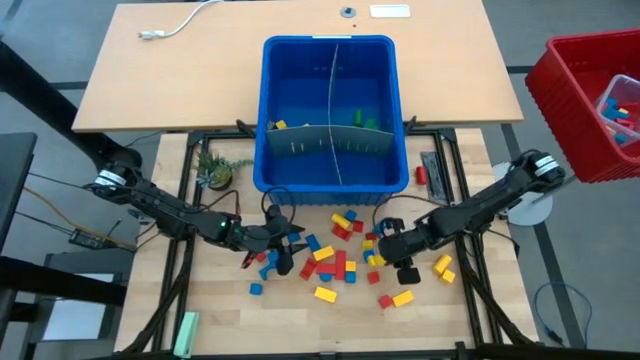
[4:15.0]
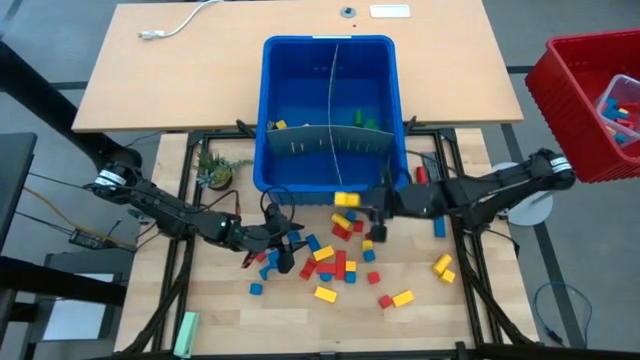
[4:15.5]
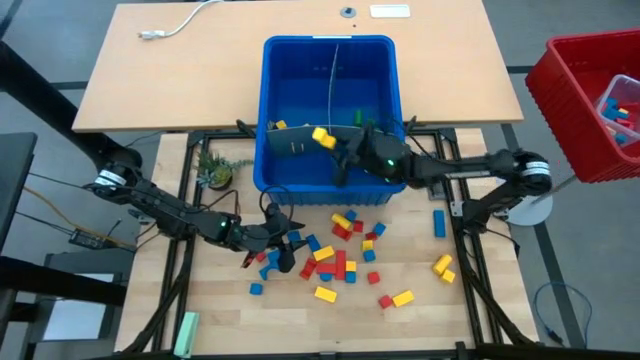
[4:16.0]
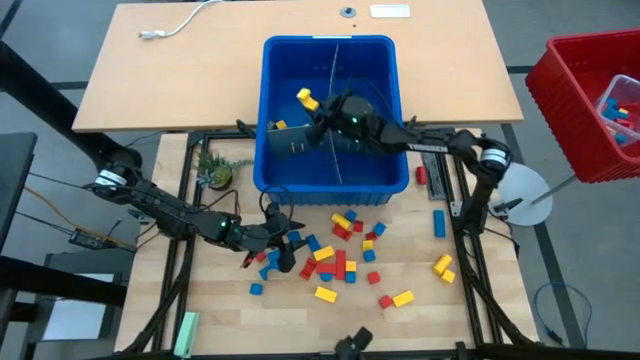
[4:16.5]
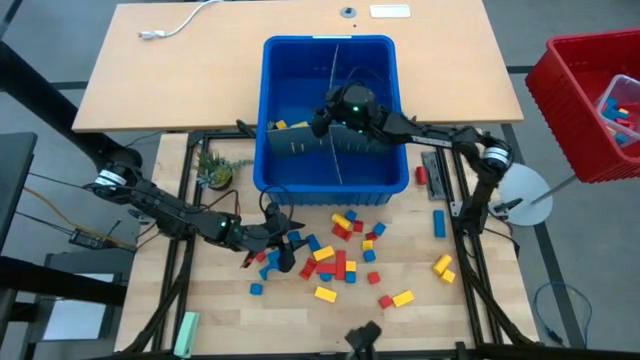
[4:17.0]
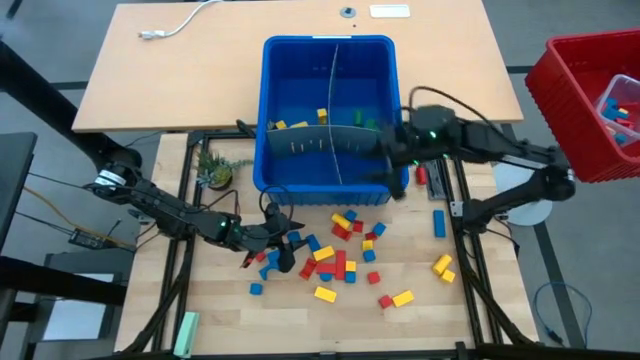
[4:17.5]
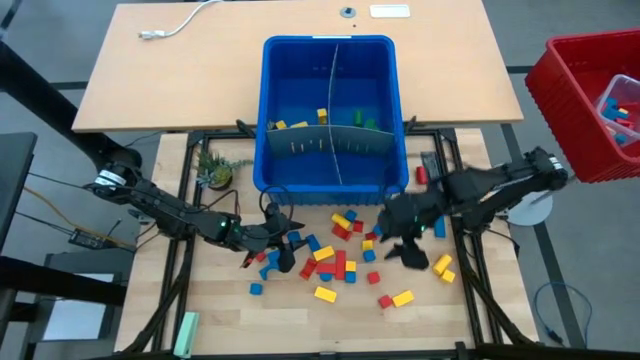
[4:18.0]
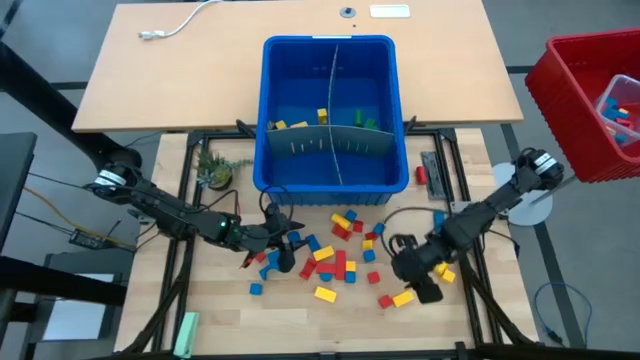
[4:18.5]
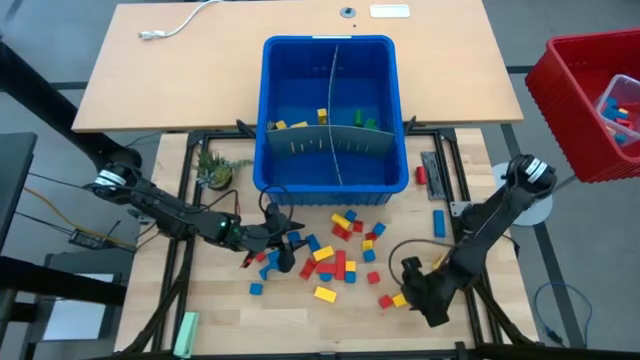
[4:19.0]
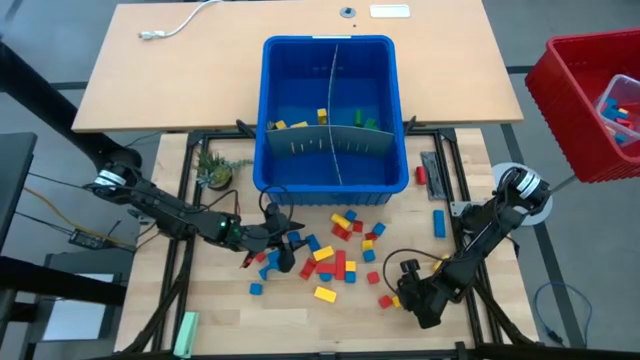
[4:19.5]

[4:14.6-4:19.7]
Task: Sort blocks
Put the yellow block with the other yellow blocks into the blue bin

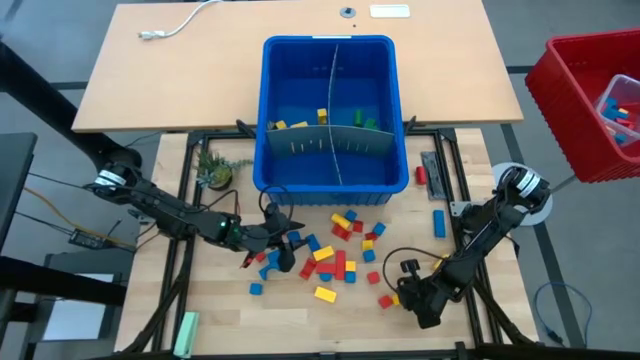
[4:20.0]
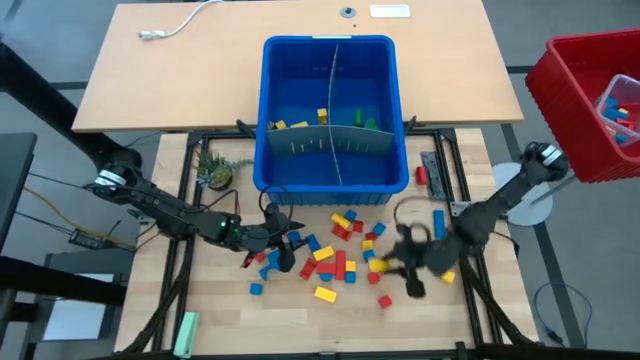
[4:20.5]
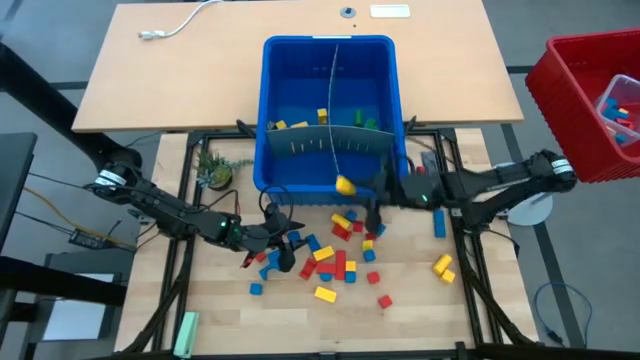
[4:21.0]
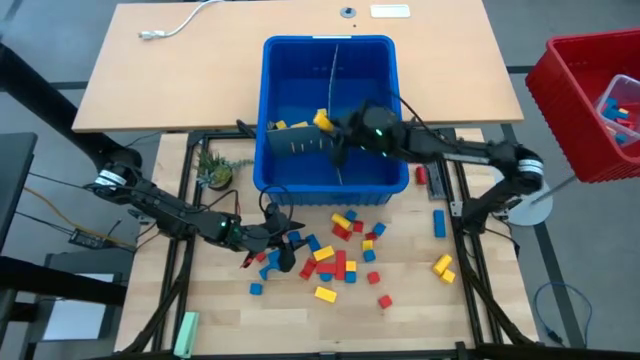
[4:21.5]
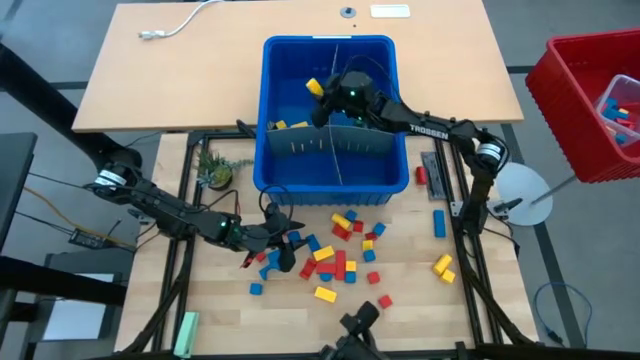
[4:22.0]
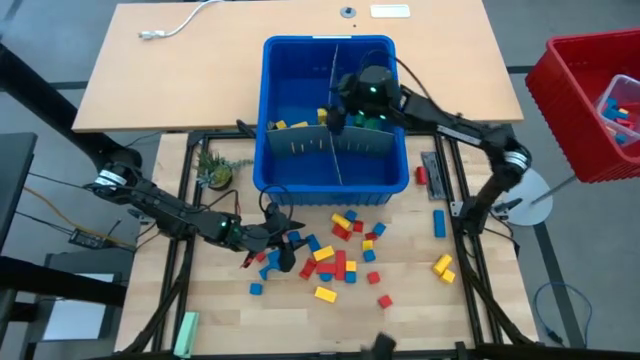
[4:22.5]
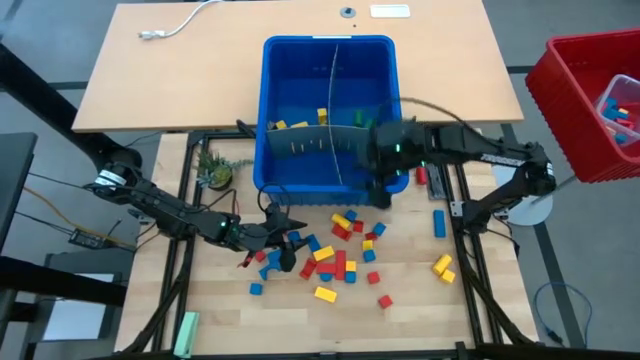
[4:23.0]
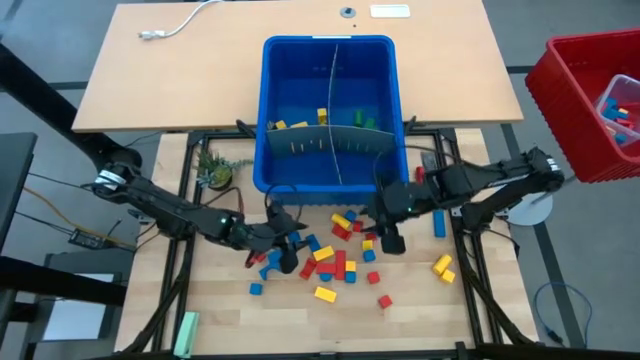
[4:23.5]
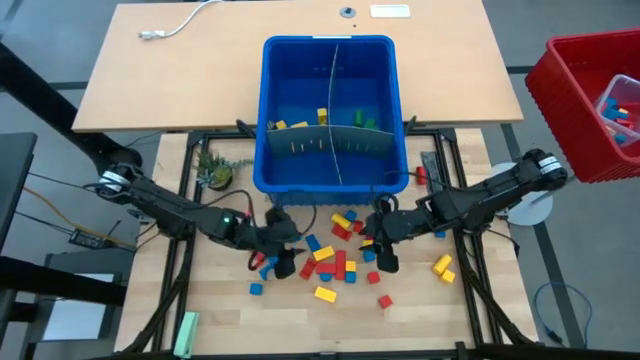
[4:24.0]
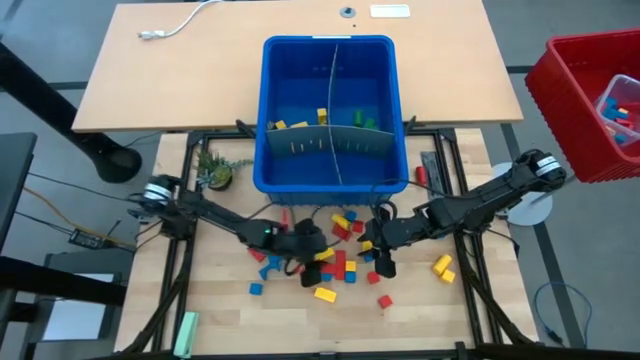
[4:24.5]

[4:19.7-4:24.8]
Put the yellow block with the other yellow blocks into the blue bin

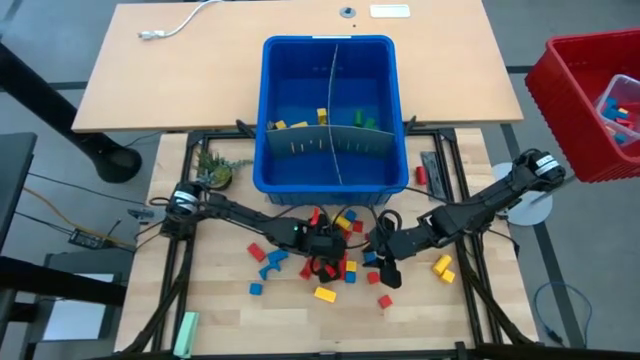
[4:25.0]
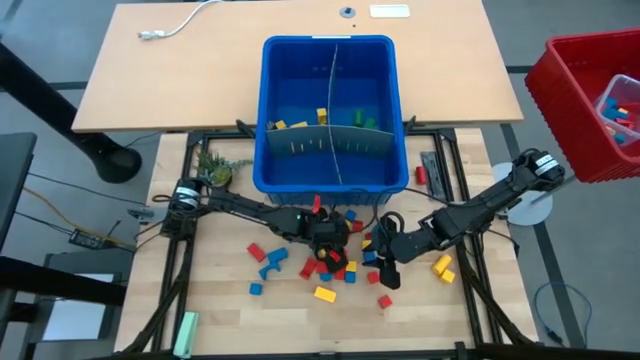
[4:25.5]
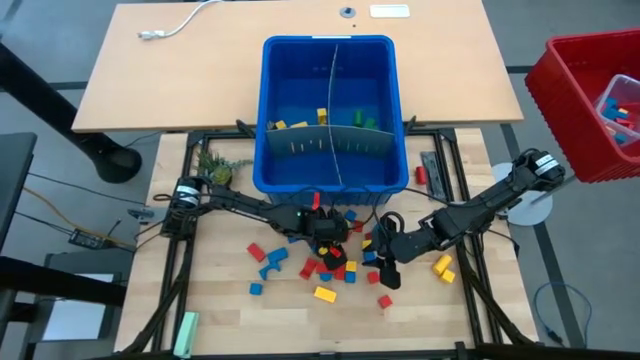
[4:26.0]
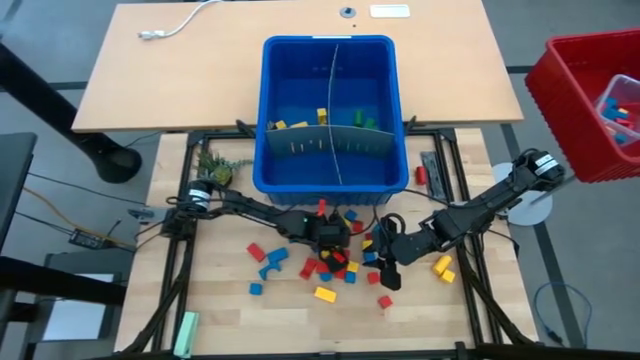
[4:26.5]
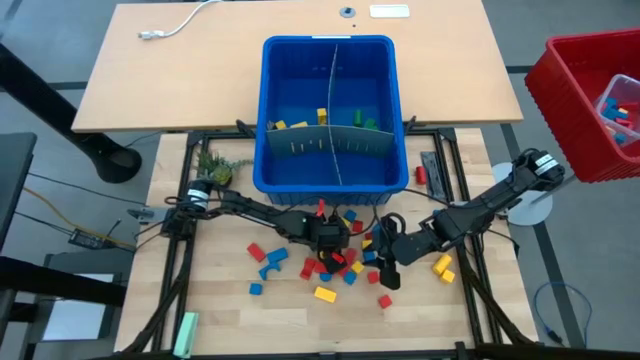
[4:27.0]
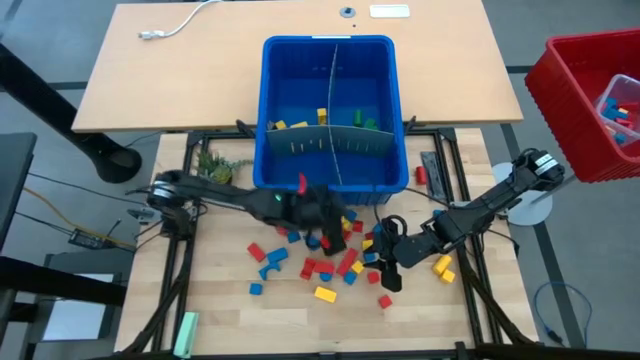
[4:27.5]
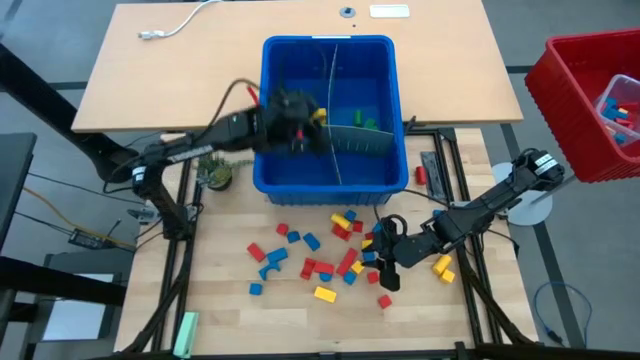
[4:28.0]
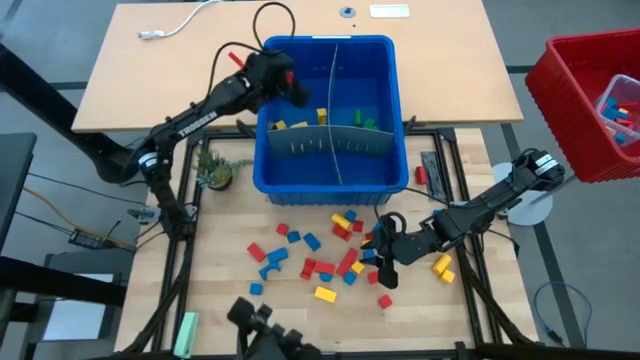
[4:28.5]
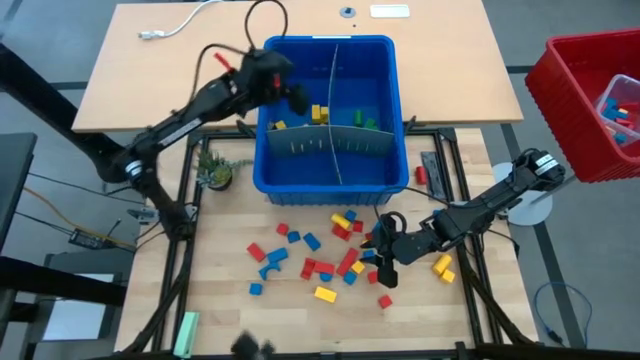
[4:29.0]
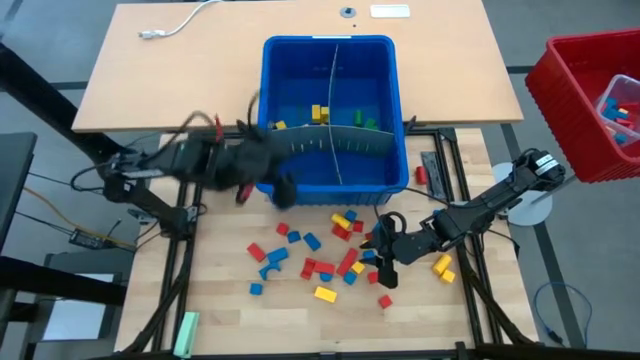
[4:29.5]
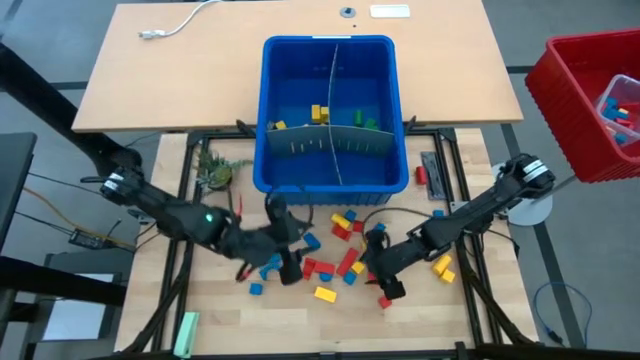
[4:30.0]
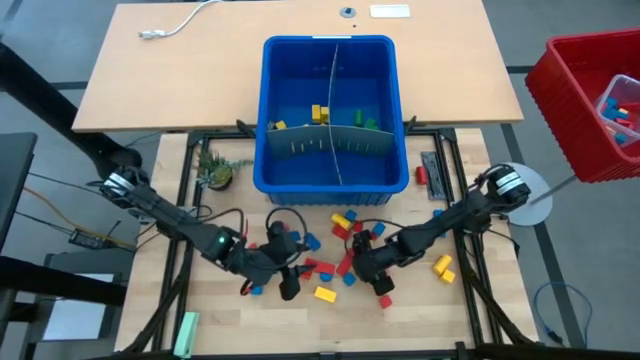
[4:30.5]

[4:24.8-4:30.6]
Put the yellow block with the other yellow blocks into the blue bin

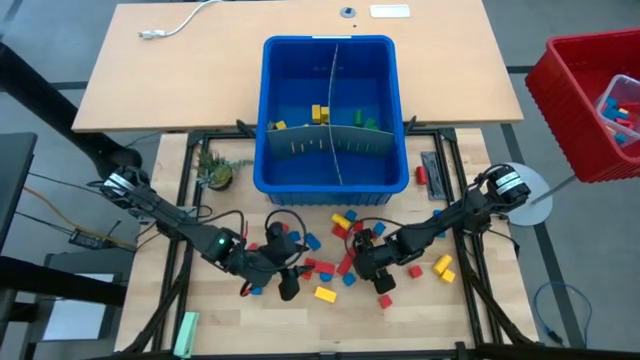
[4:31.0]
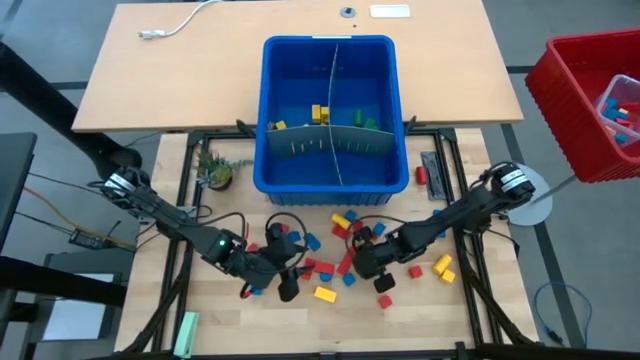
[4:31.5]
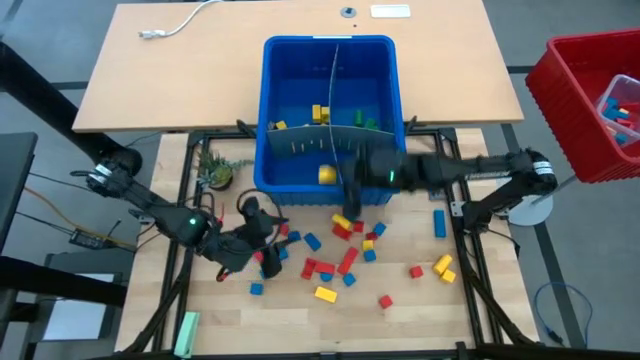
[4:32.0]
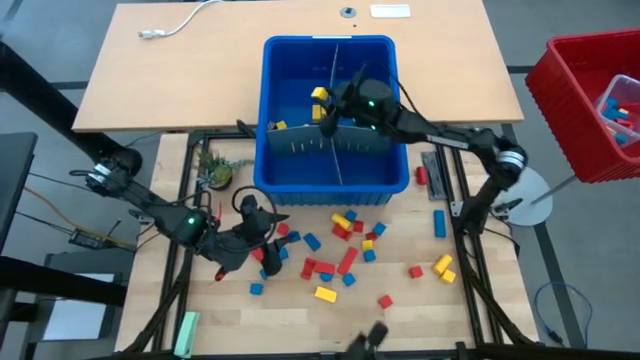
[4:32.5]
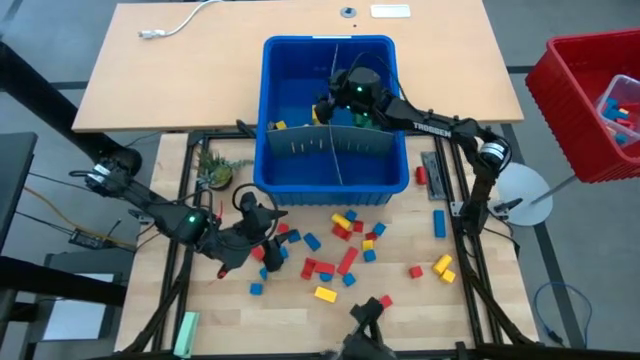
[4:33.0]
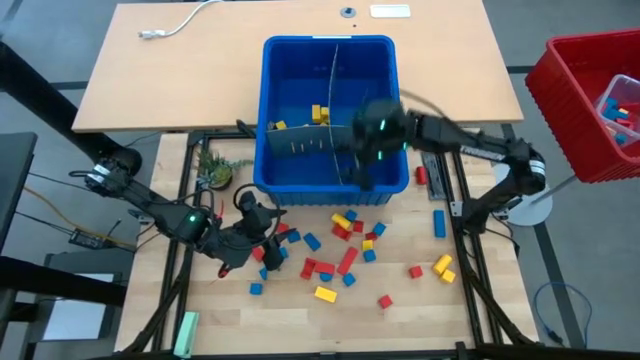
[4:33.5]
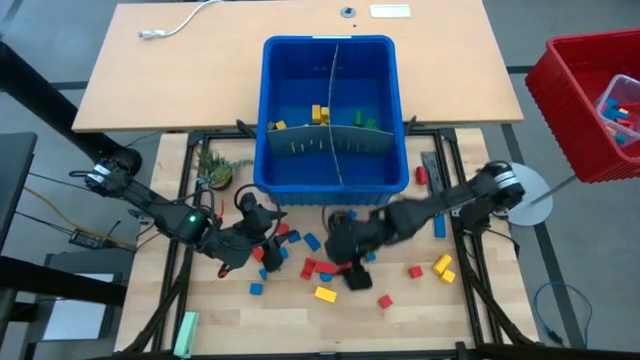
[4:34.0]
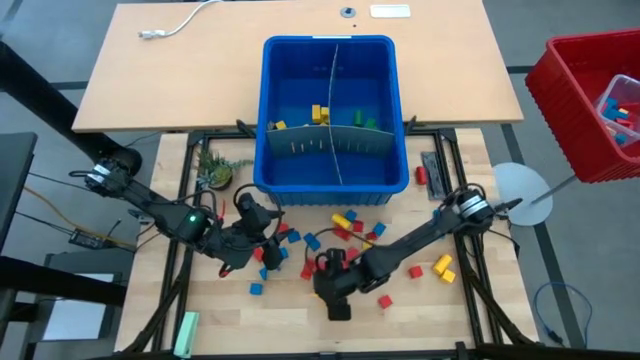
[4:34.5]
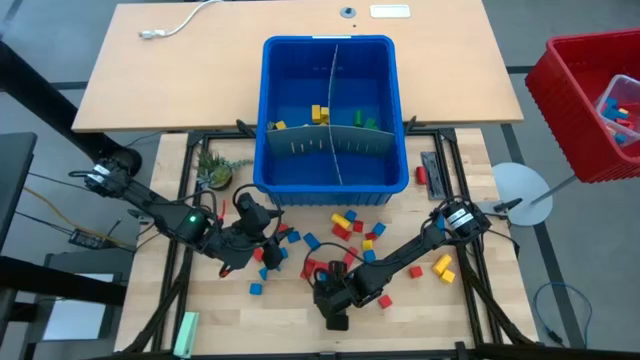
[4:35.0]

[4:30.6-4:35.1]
Put the yellow block with the other yellow blocks into the blue bin
